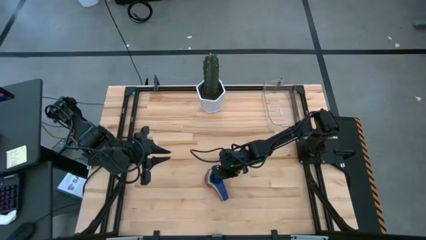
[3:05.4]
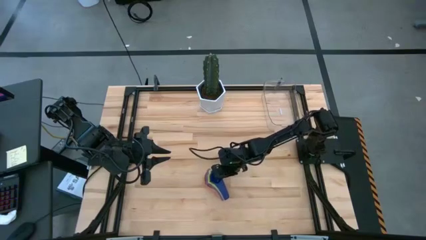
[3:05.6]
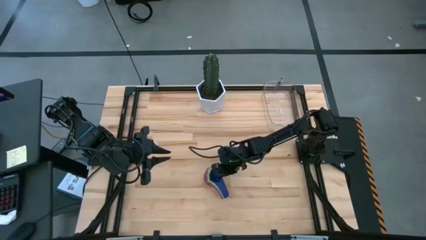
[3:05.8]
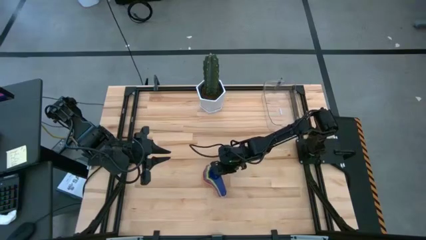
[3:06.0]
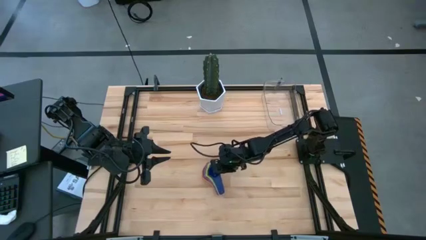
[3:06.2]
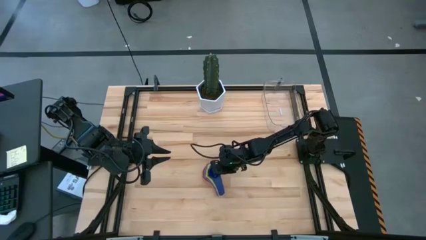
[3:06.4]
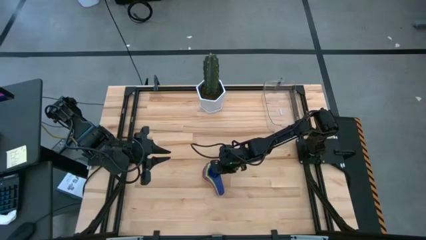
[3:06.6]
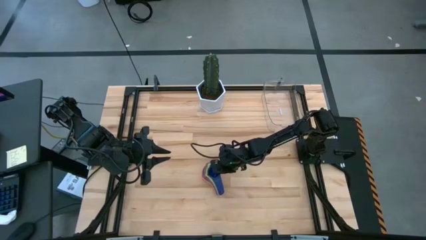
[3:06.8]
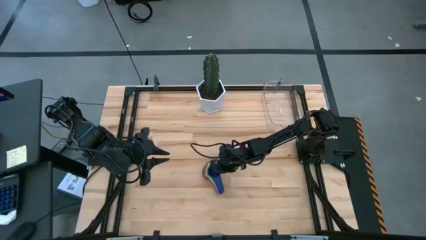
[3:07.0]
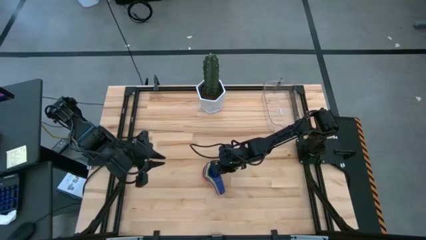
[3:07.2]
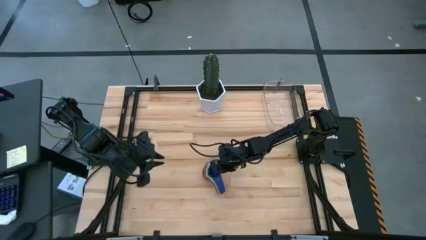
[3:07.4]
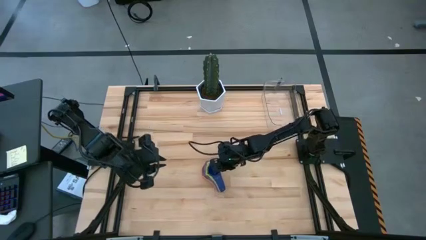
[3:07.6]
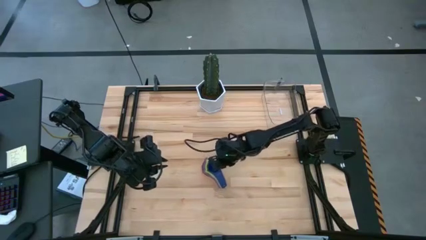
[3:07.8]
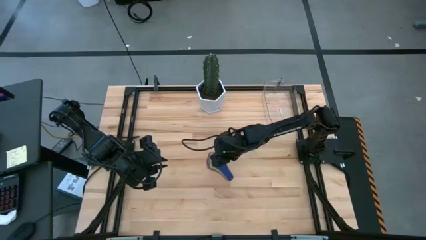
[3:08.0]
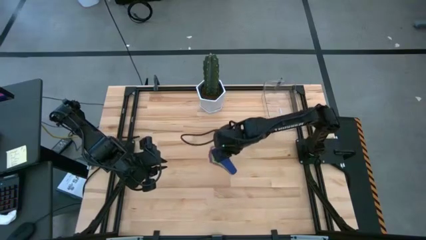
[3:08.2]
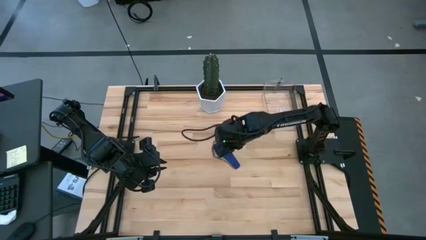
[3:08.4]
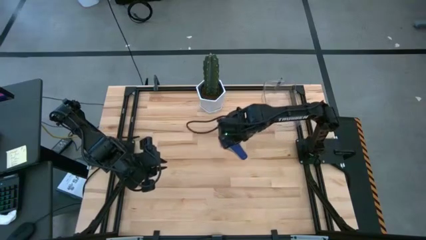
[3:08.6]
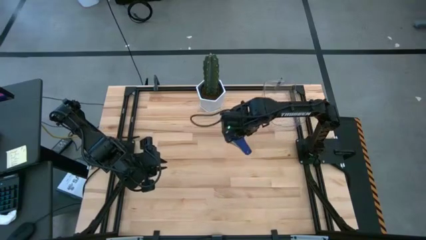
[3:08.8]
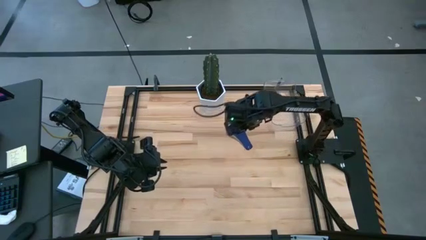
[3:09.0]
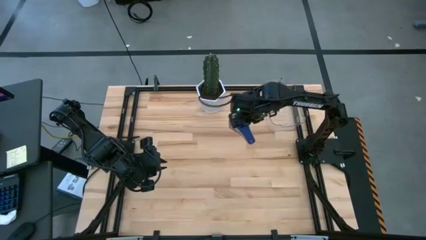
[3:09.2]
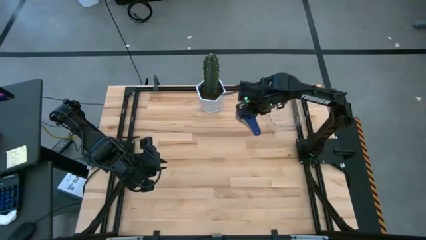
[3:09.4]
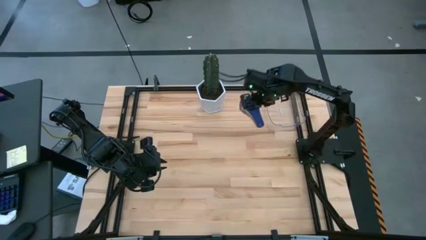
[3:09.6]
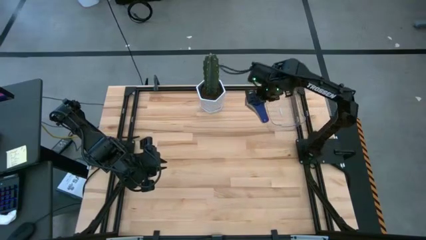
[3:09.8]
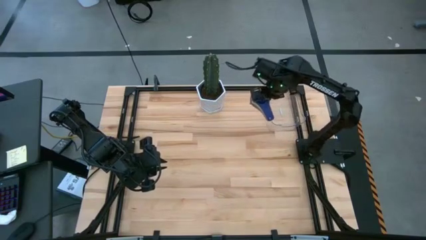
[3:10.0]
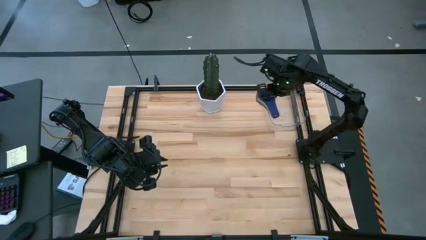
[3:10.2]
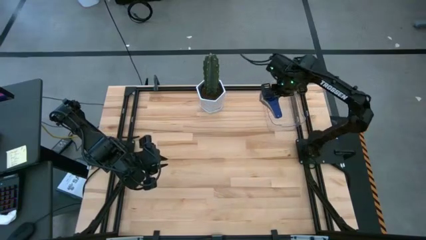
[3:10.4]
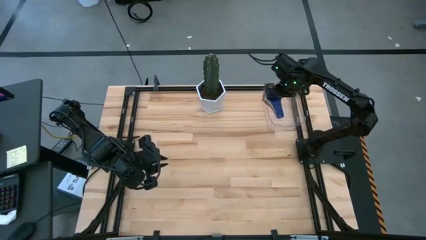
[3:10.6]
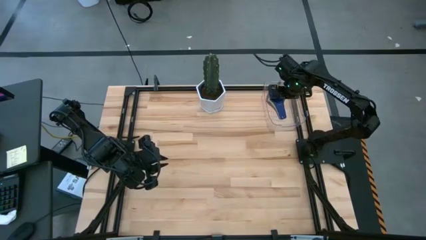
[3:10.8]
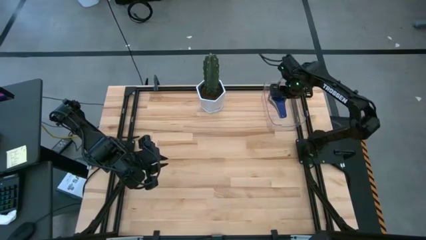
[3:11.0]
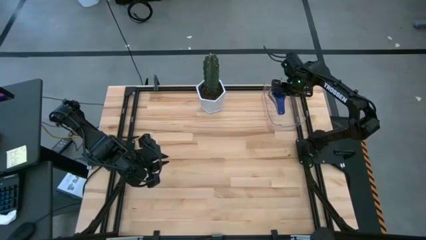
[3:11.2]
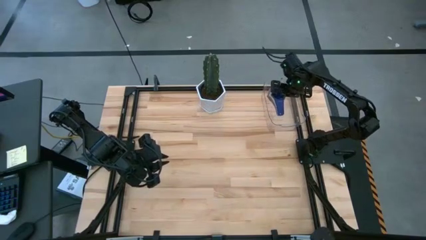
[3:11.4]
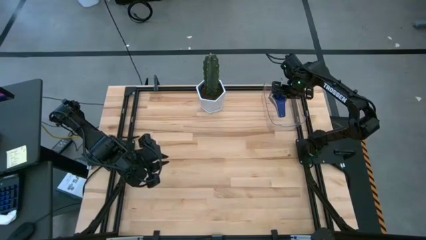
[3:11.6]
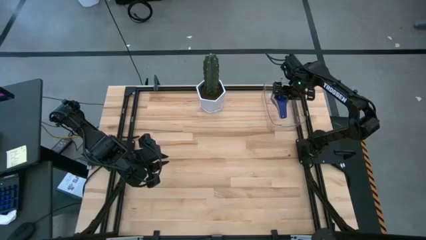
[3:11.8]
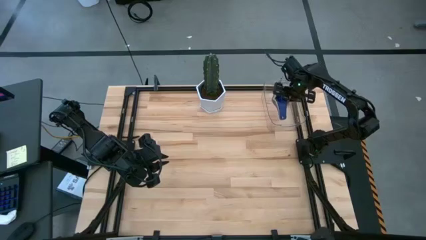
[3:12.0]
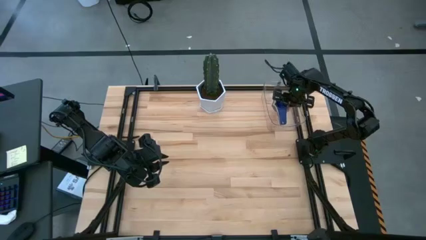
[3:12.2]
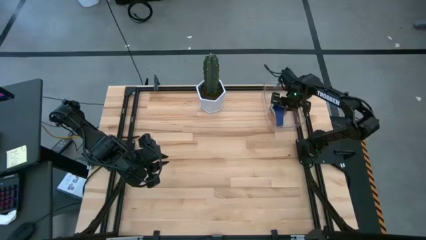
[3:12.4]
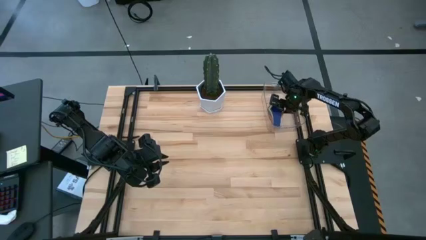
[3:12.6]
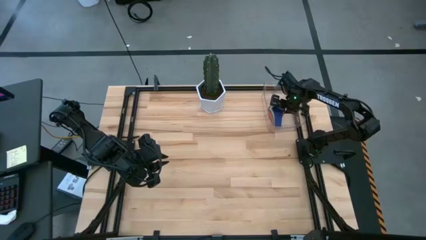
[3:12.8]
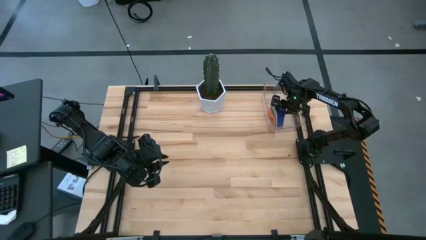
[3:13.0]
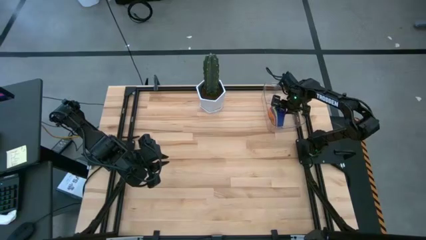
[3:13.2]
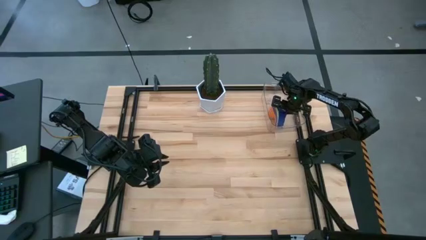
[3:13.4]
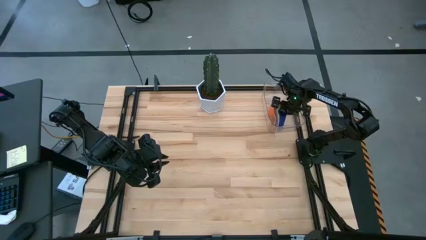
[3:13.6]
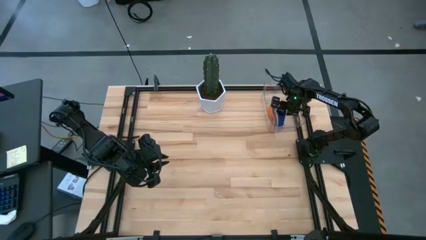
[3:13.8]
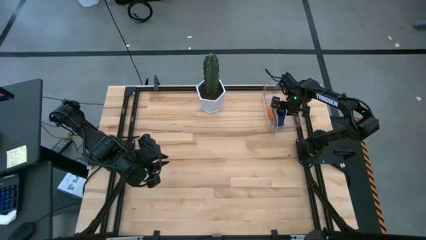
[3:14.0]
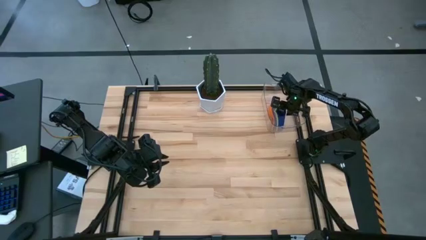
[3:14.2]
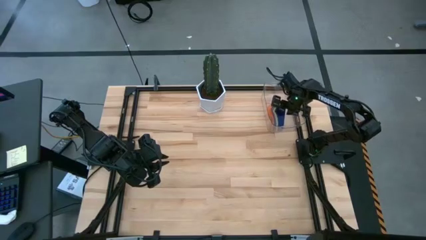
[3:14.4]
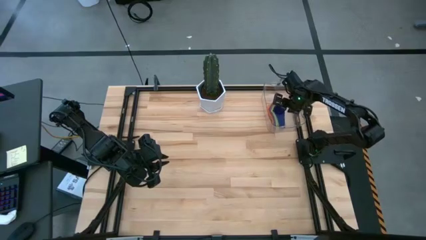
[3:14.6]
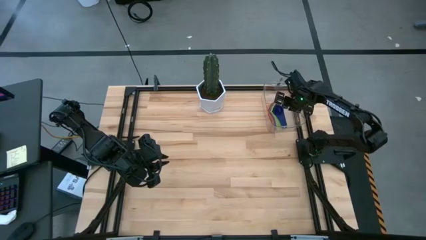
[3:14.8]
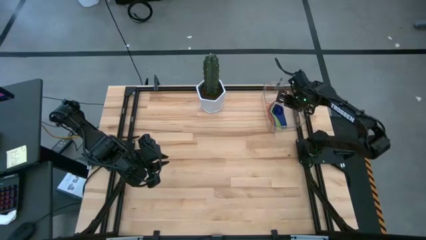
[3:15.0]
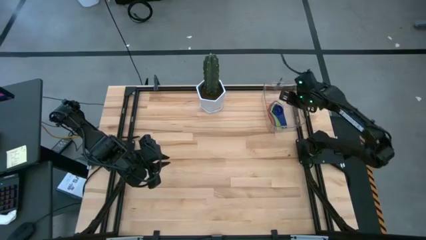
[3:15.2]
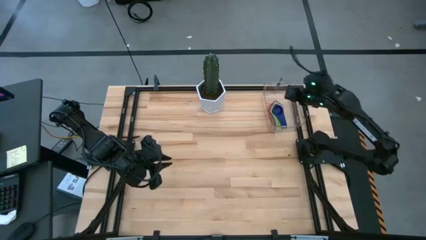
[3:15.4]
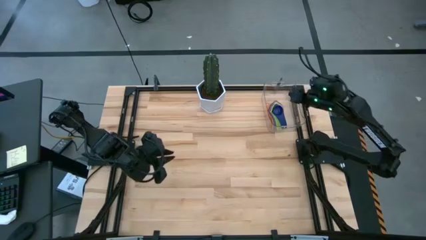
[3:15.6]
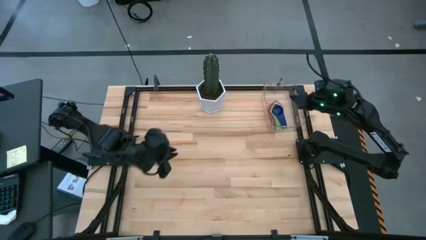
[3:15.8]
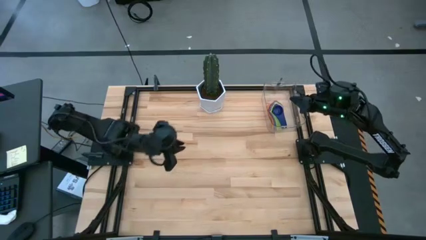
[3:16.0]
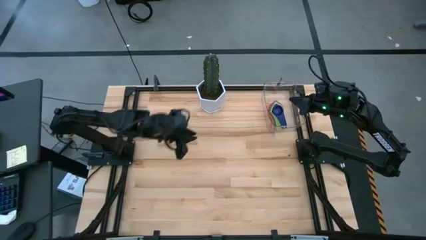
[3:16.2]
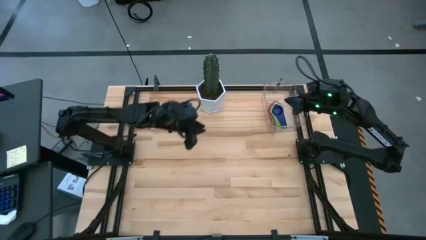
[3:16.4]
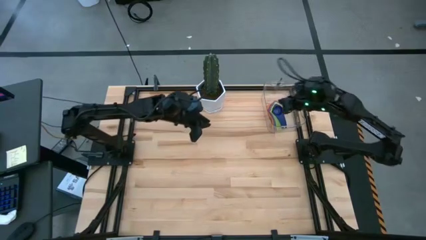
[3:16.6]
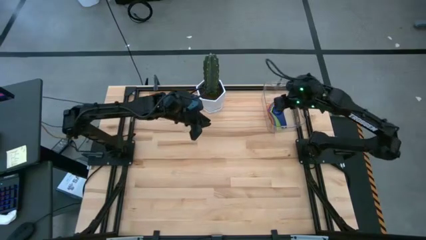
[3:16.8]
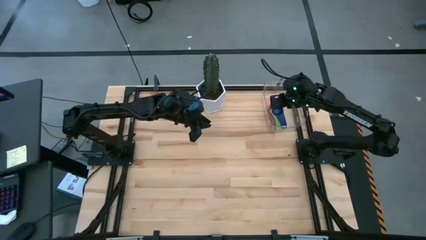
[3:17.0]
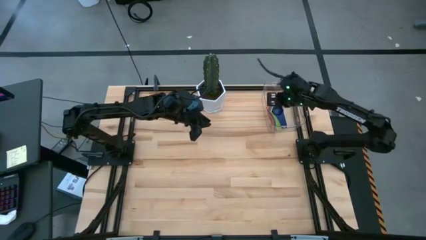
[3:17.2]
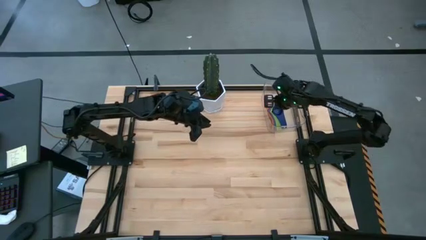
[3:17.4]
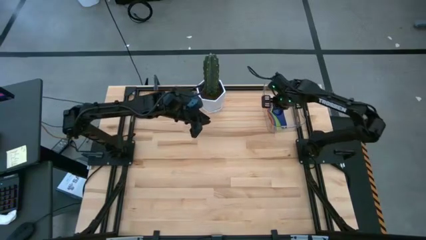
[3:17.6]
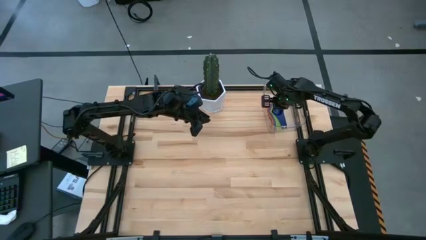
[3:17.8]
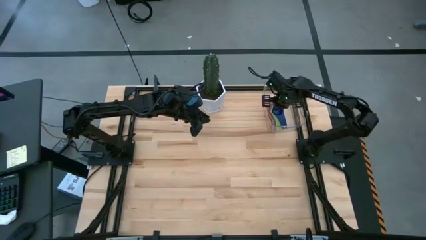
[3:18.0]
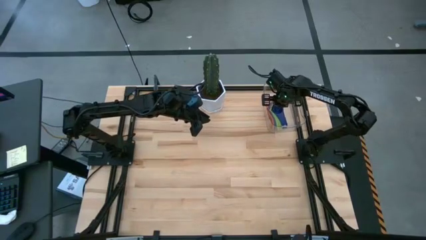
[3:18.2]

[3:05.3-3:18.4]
Task: Nest measuring cups in basket
Put the stacked measuring cups into the transparent bin

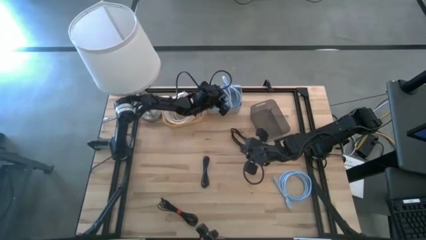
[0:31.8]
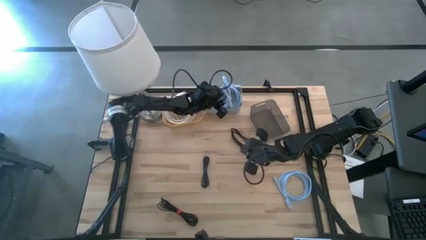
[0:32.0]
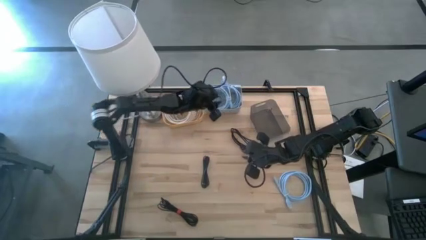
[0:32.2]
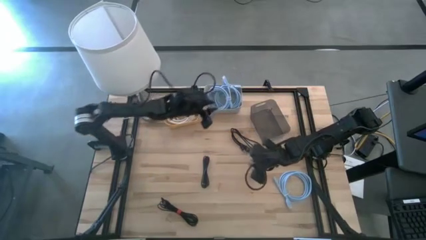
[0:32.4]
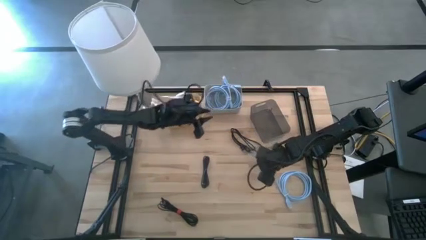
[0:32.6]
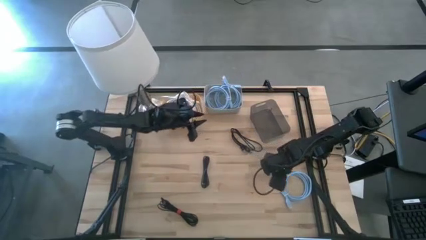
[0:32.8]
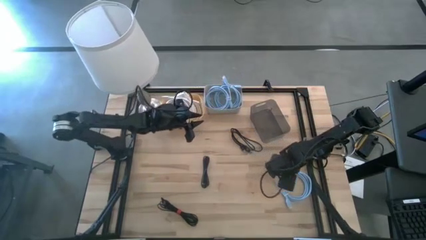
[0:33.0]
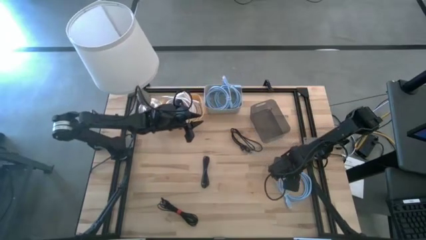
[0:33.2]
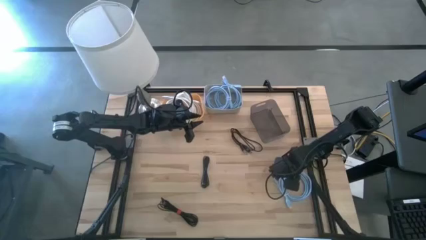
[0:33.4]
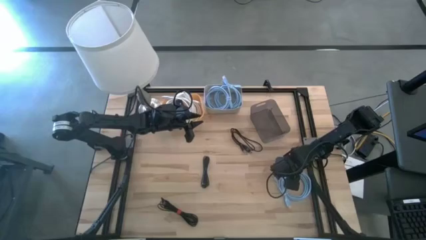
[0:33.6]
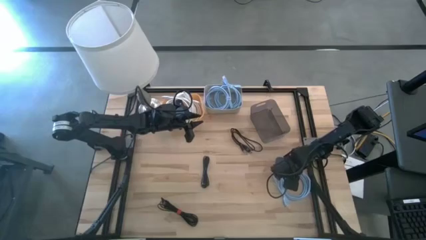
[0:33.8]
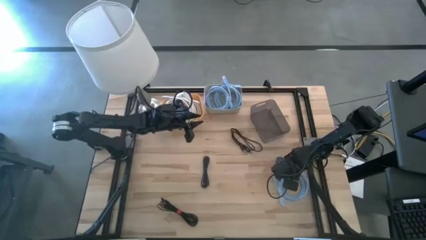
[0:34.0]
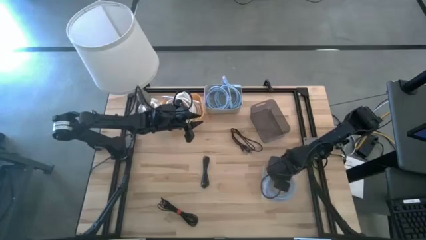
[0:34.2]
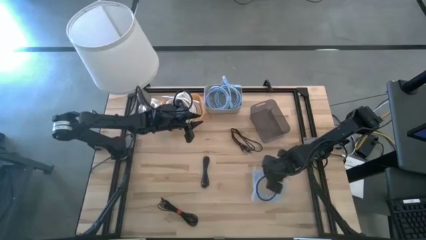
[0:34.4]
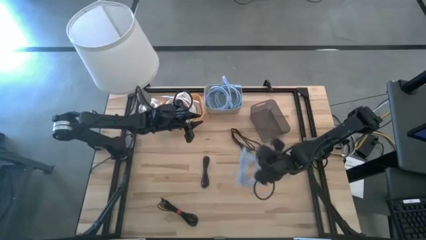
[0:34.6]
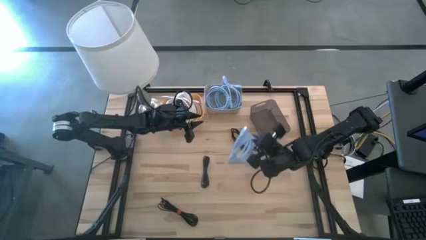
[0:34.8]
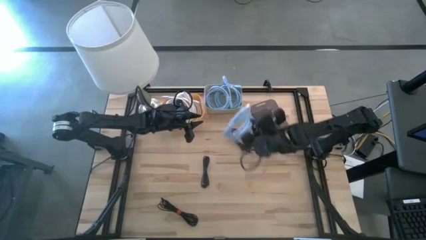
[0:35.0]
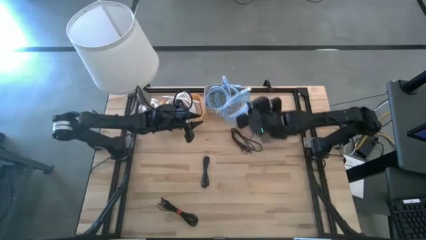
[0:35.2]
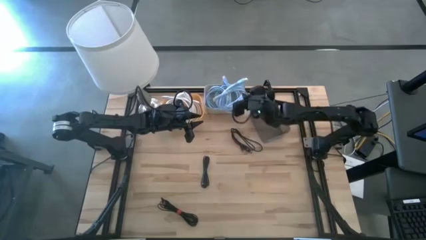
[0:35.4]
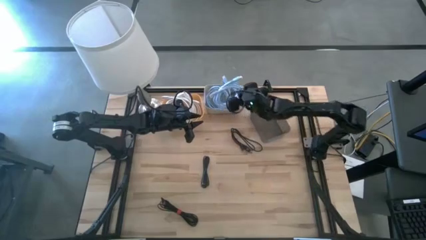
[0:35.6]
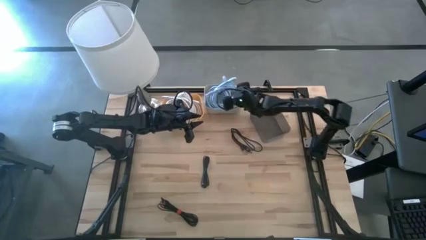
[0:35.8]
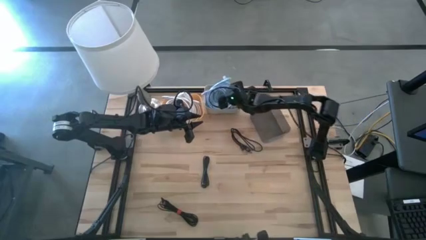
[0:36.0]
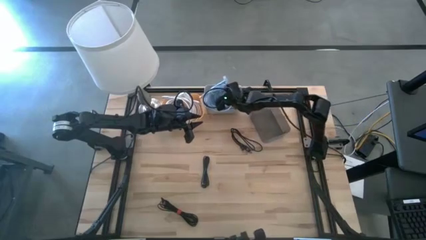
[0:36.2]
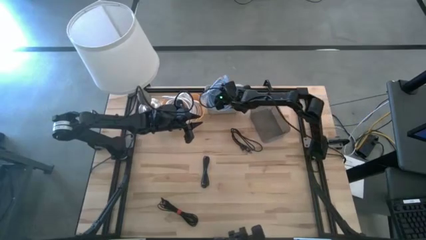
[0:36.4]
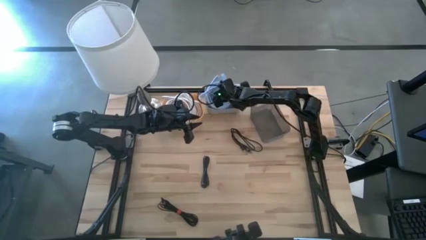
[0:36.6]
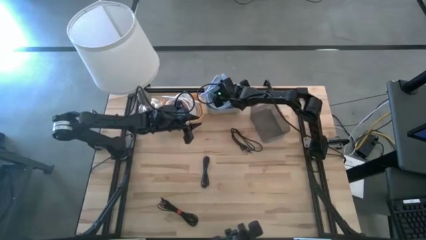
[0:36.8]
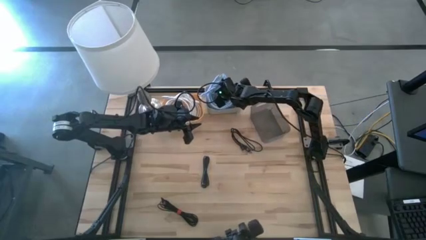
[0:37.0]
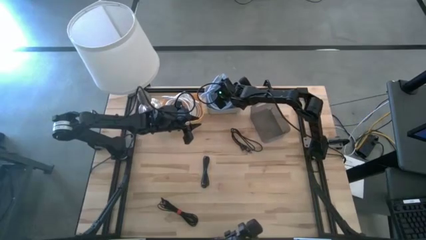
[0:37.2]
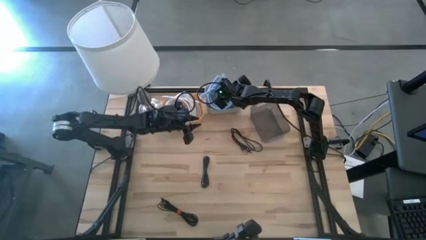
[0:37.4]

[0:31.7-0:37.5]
Task: Pick & Place USB Port
Put the blue display cable into the gray bin
